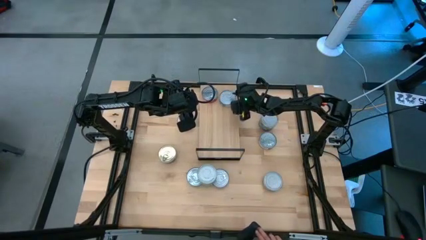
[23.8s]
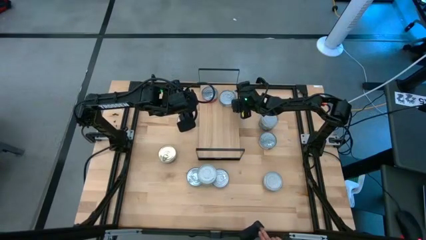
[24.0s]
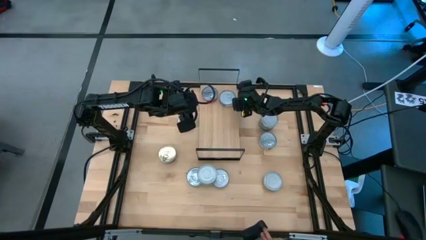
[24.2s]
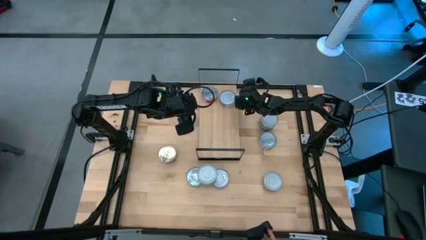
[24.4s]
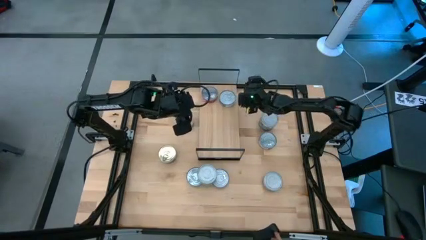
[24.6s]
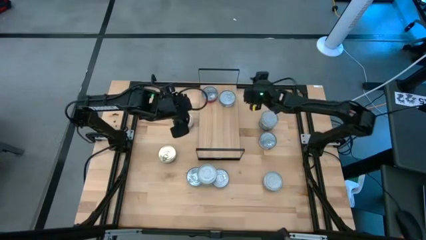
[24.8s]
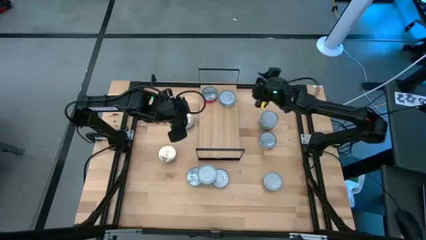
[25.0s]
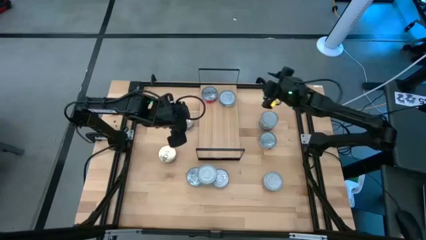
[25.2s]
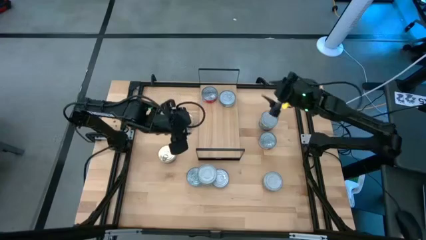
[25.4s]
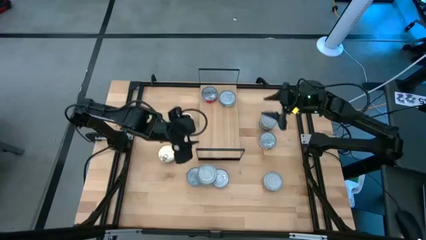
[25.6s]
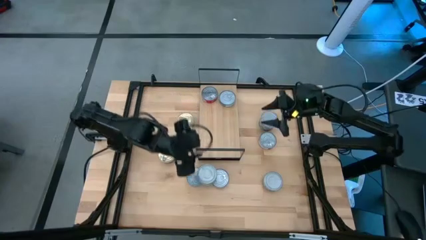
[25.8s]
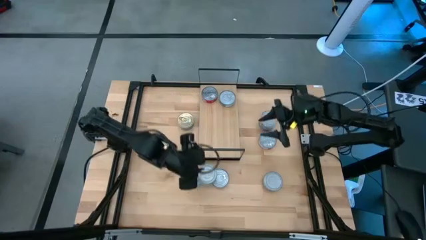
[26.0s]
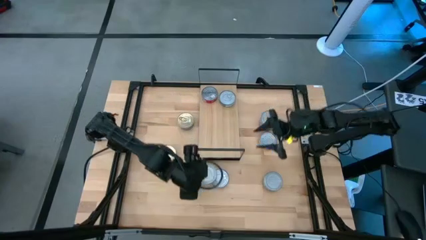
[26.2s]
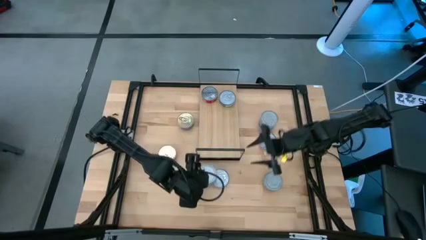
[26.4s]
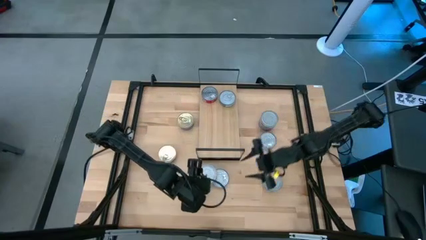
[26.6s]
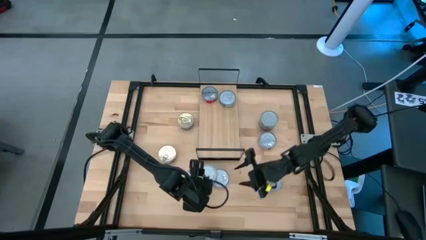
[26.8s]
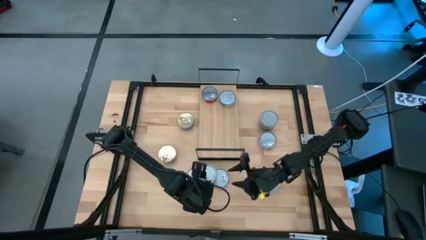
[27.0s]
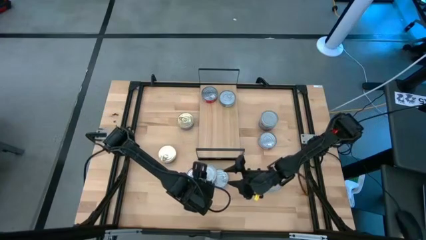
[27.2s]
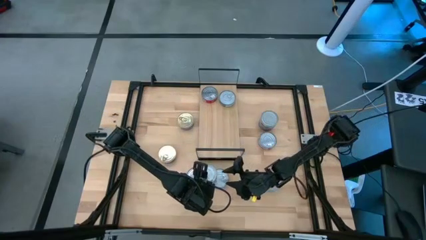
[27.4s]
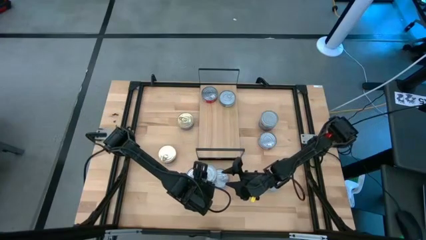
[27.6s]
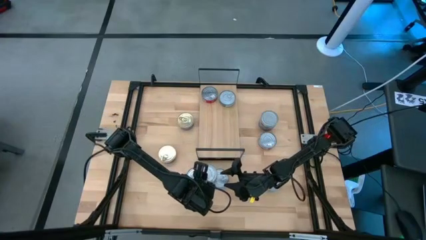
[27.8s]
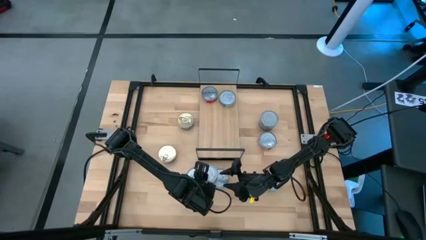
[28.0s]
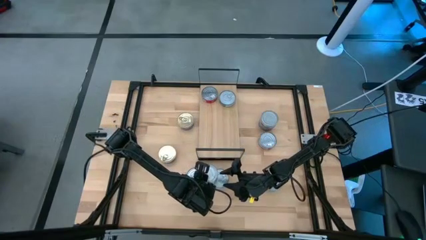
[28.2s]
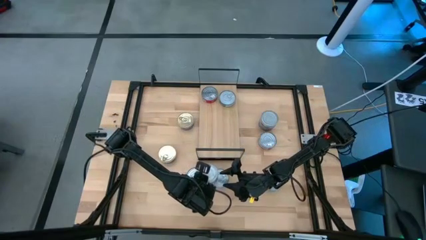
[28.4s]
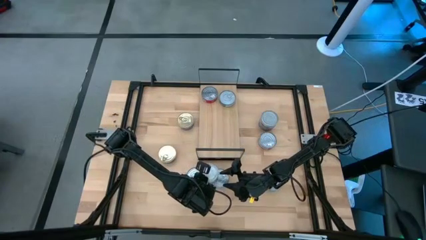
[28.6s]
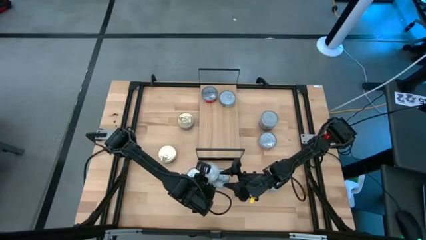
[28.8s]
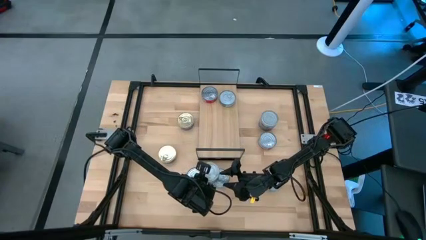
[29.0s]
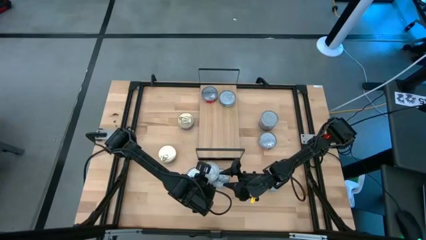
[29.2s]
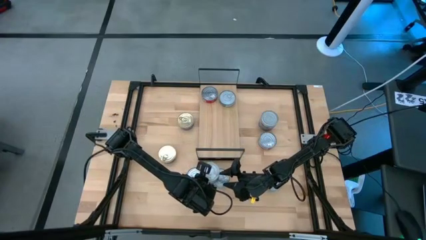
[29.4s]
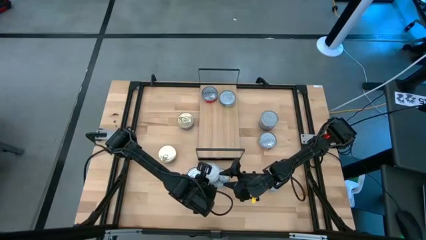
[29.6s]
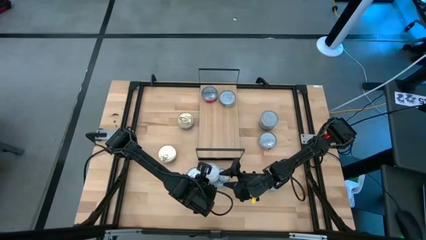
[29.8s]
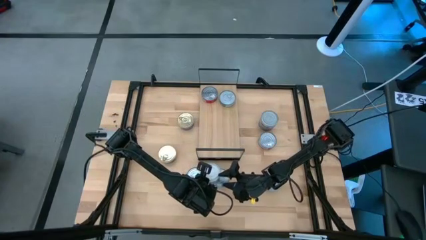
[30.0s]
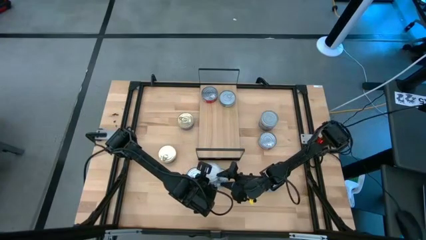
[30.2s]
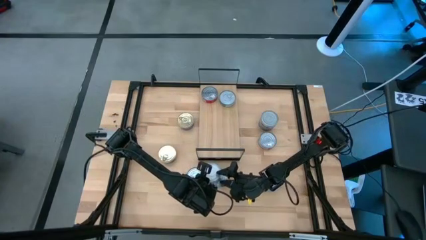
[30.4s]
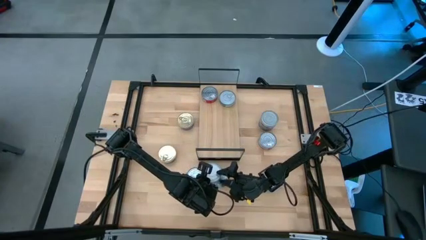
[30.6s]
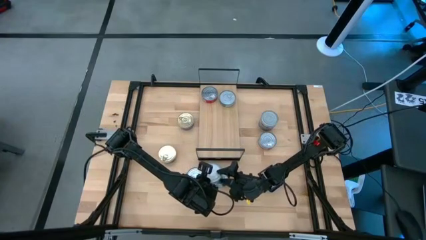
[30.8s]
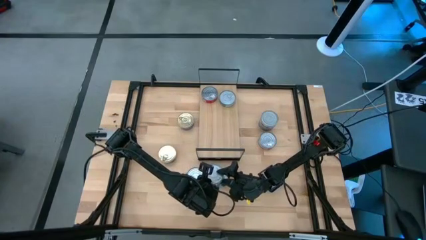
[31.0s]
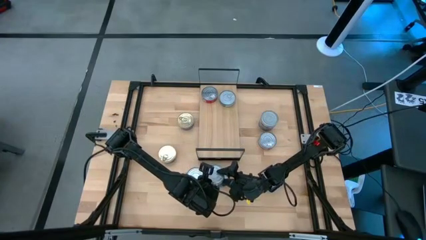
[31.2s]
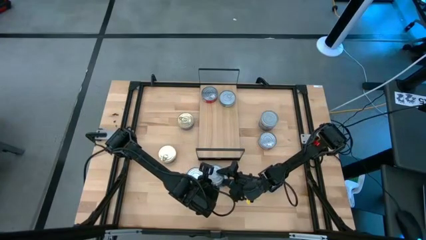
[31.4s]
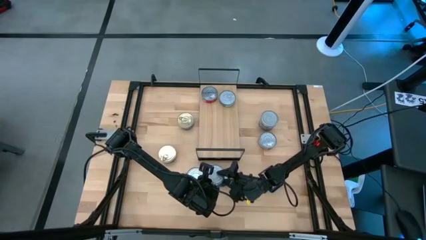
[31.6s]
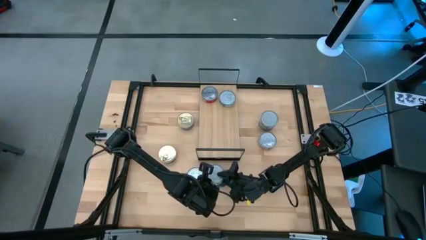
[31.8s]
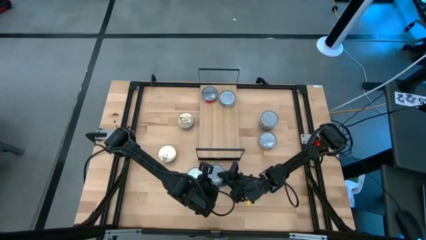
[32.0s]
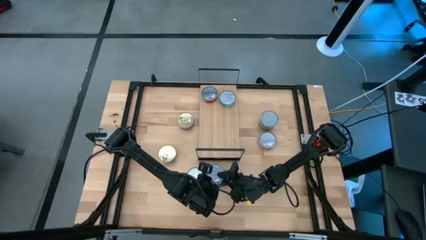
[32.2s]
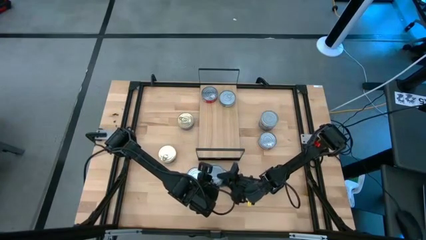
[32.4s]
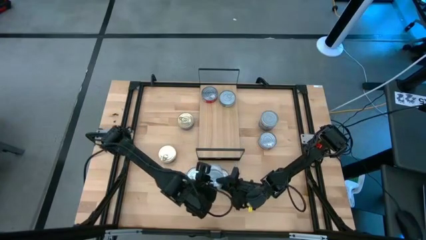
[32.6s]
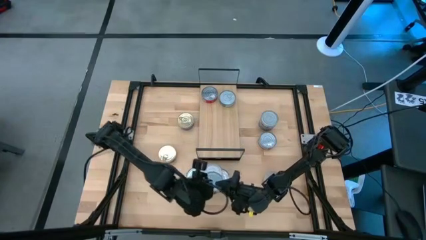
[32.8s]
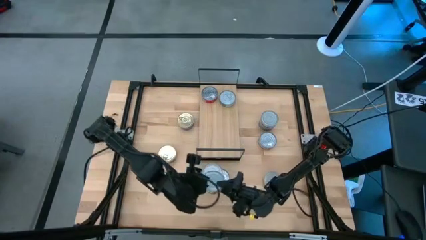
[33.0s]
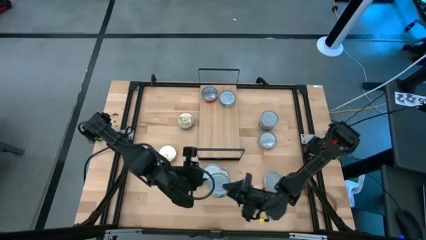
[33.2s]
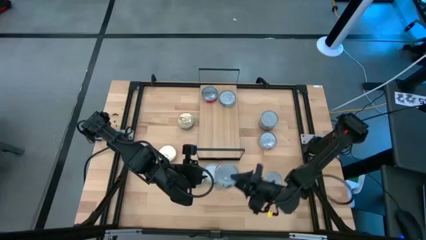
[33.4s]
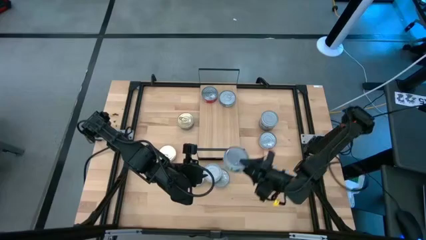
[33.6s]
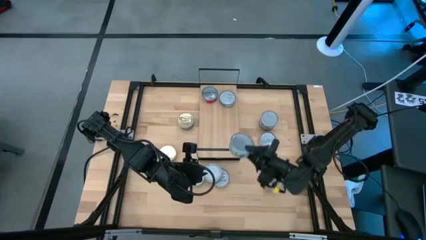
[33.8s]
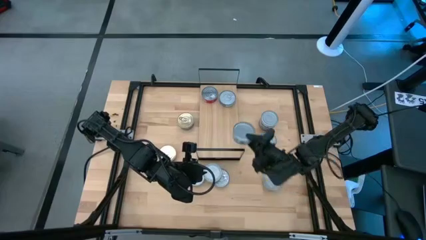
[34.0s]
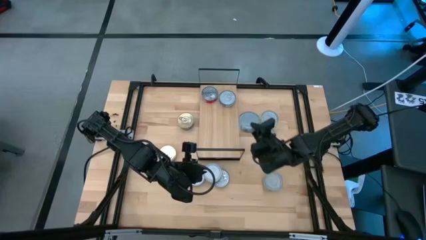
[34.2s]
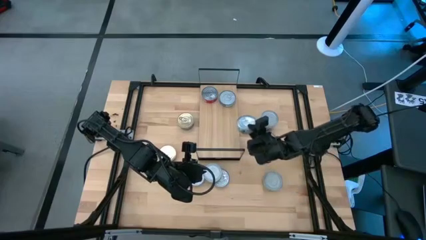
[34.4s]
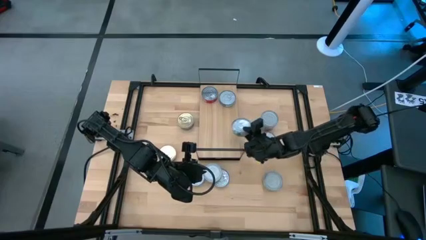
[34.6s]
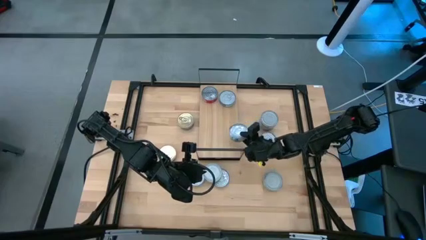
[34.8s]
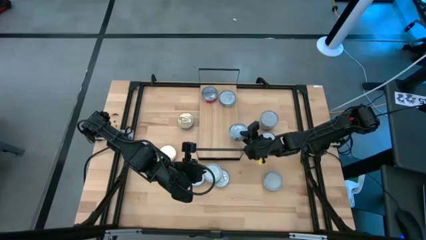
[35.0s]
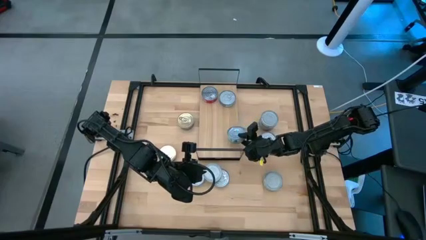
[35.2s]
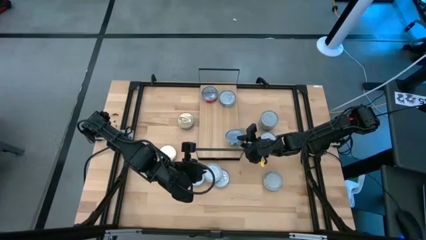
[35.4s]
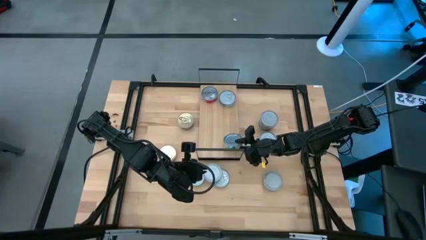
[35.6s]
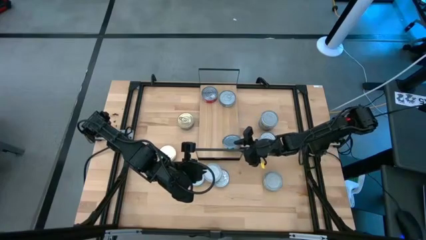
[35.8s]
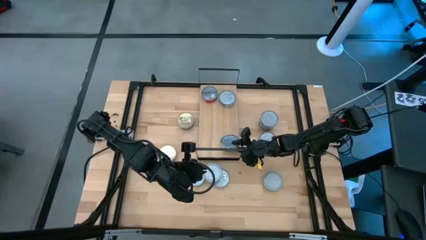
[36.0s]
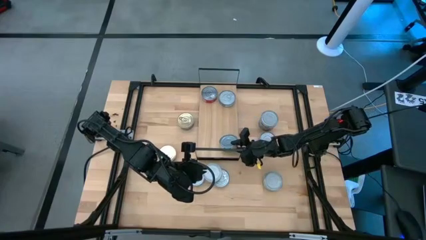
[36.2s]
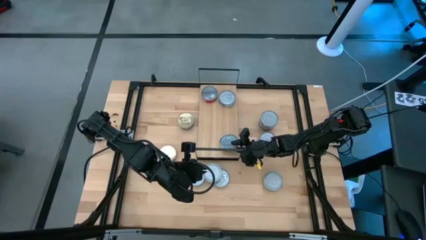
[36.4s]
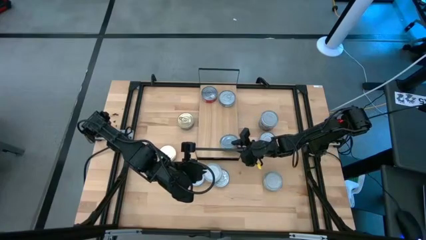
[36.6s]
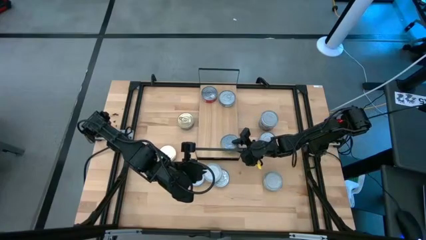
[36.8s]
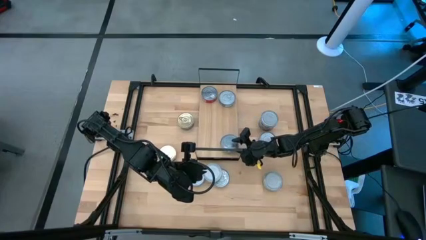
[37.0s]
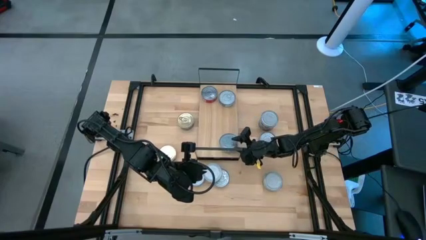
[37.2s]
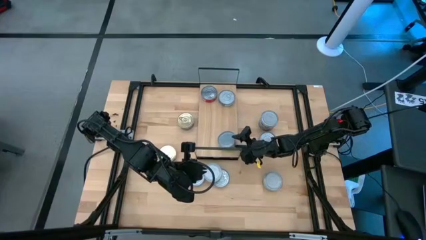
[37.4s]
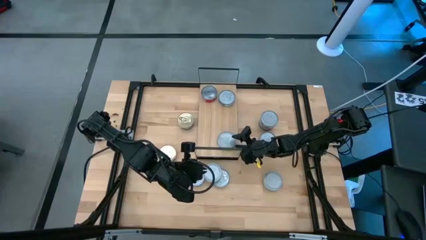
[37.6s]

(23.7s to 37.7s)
Task: Stack canned seafood by type on shelf
Put the green tuna can on the shelf
